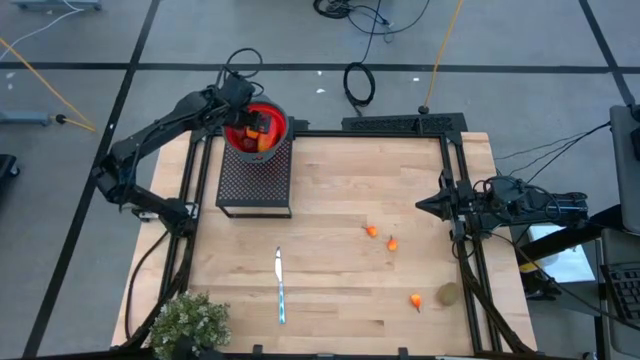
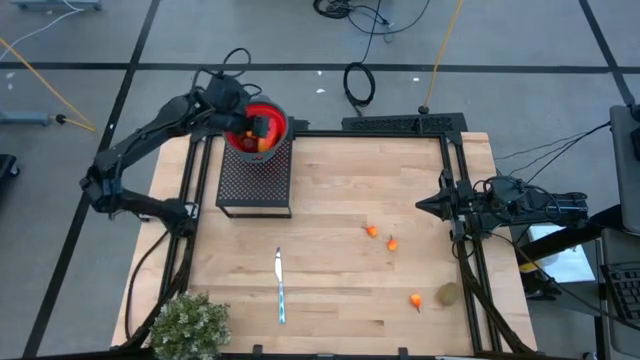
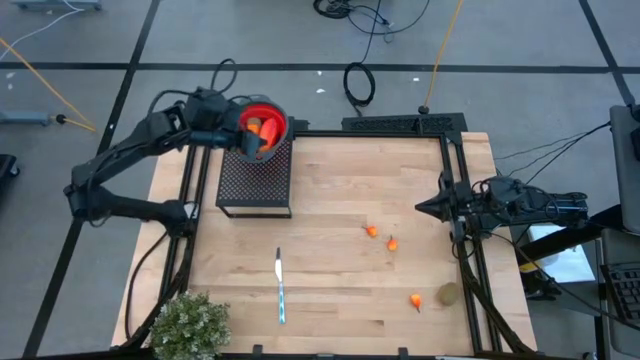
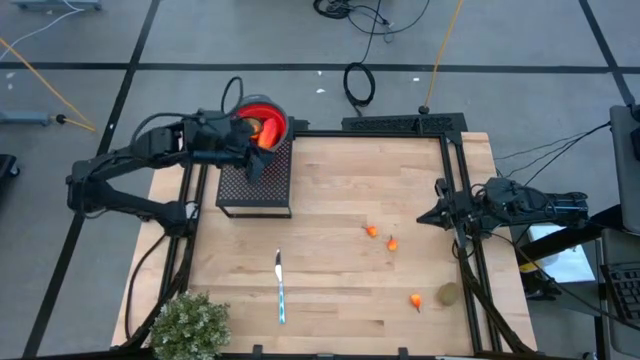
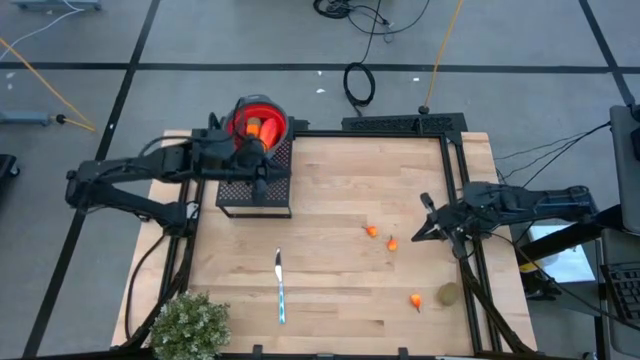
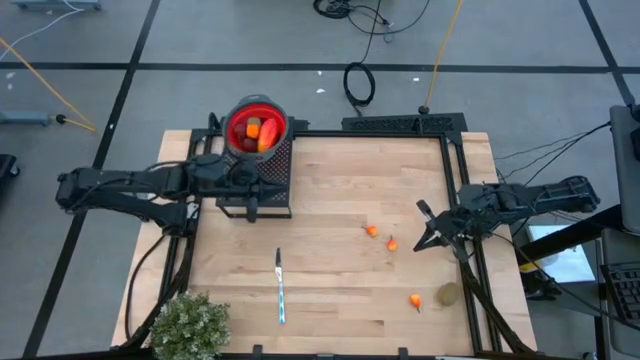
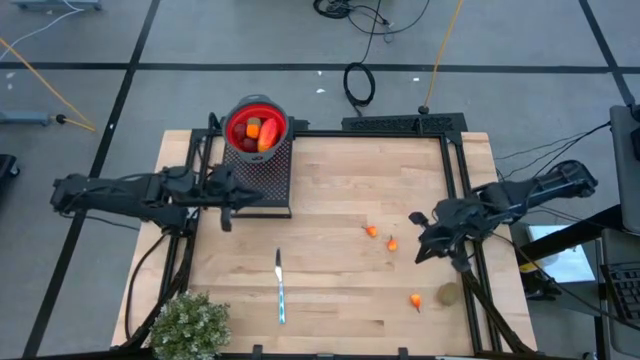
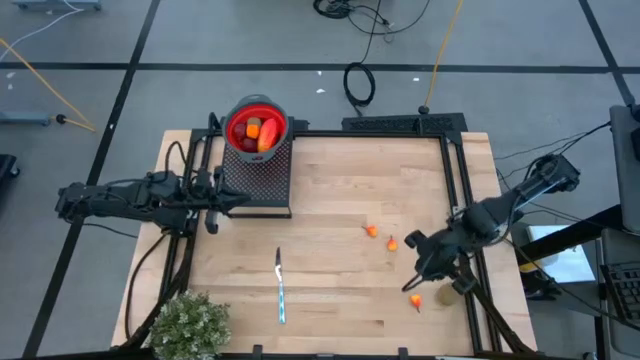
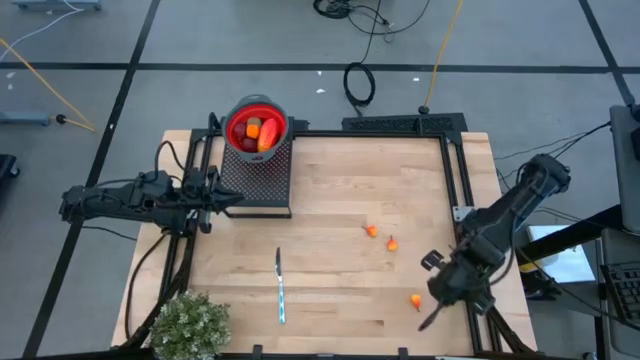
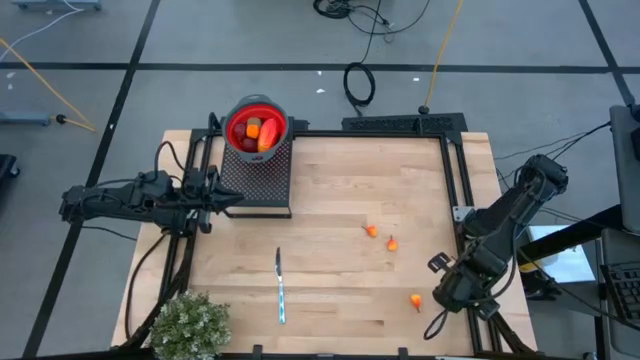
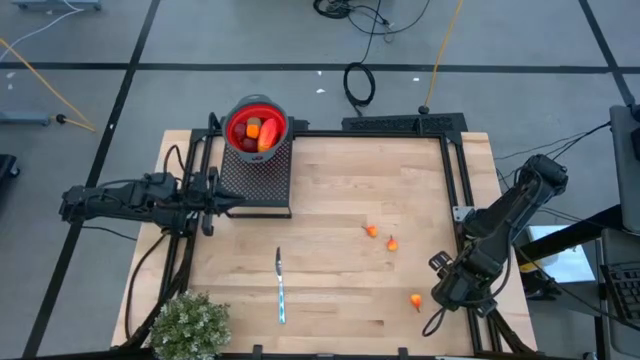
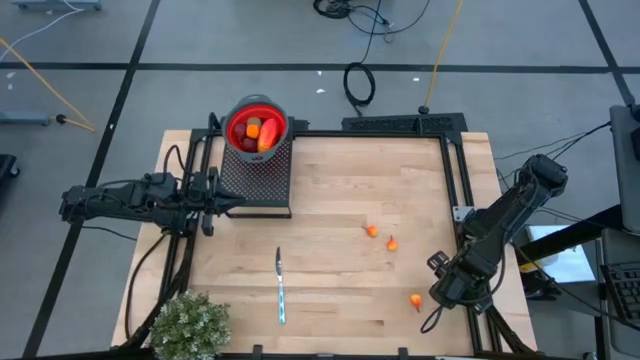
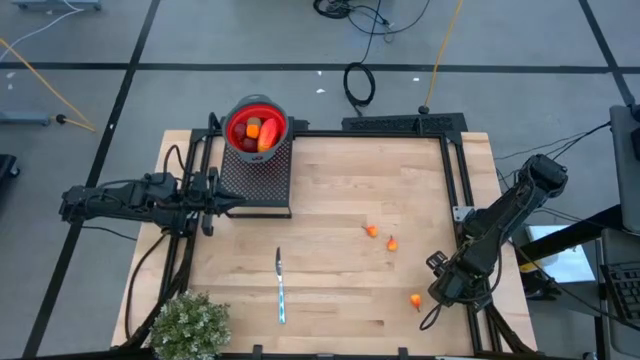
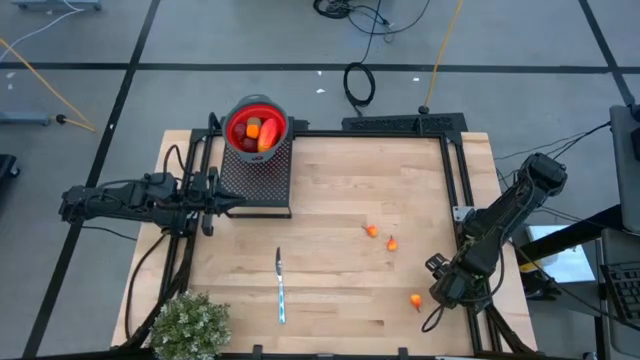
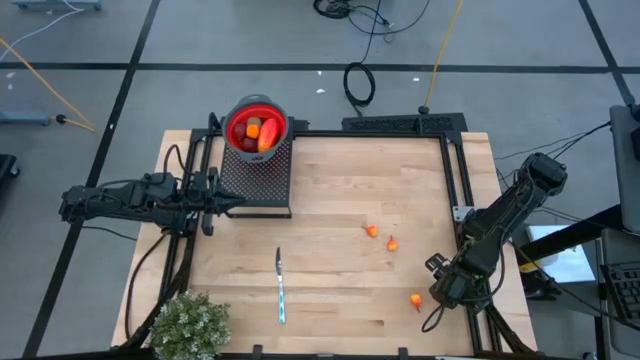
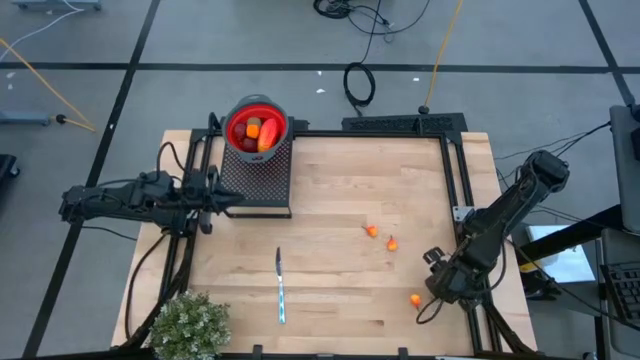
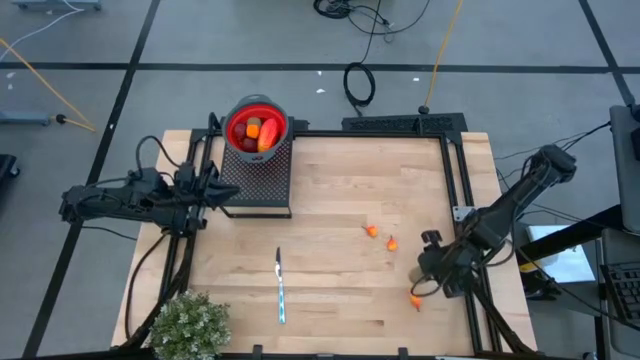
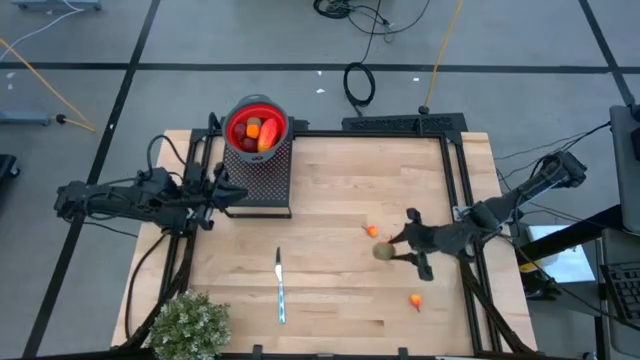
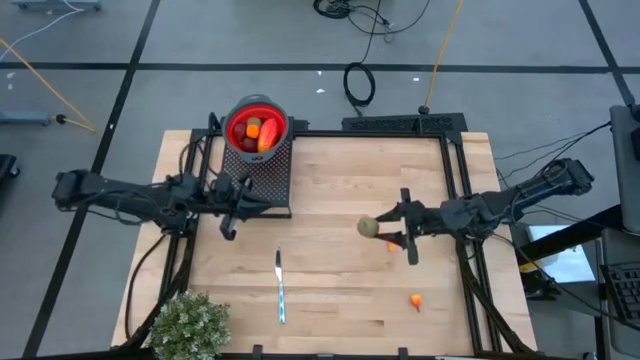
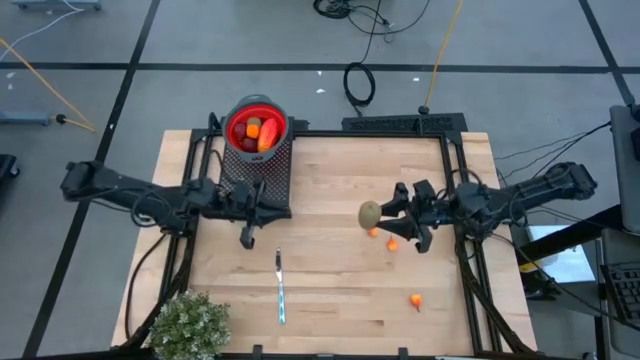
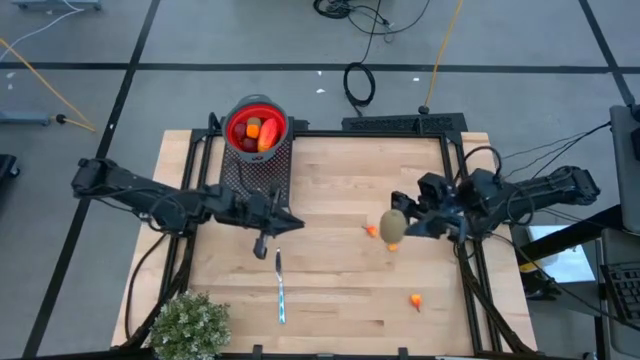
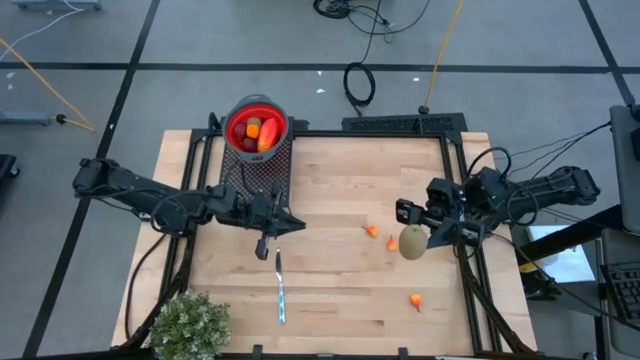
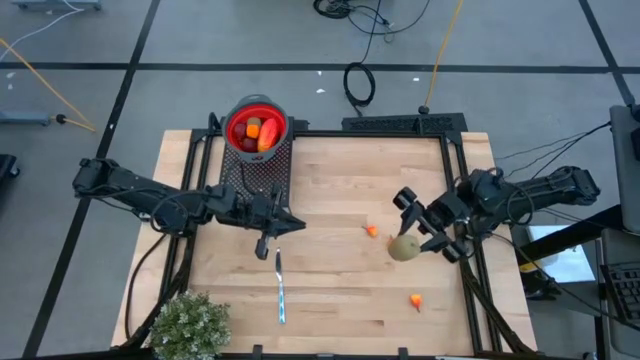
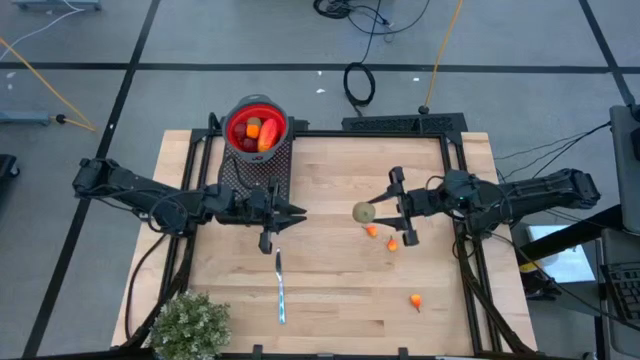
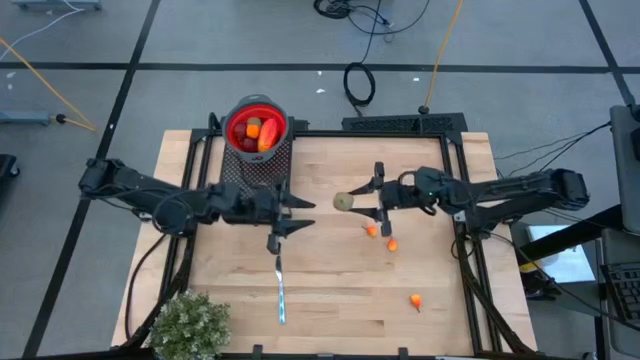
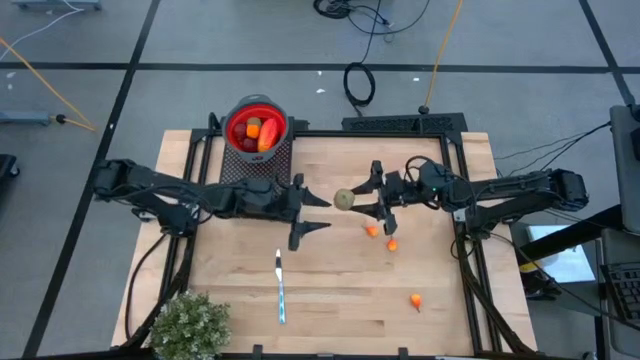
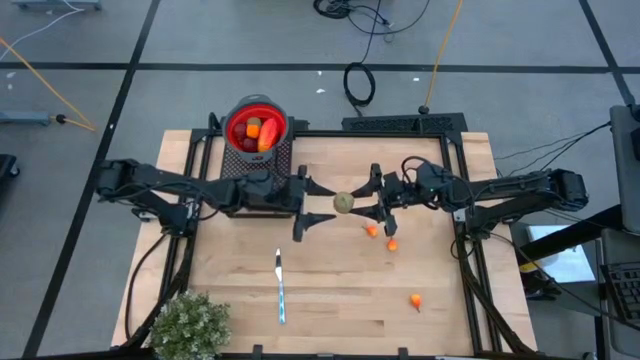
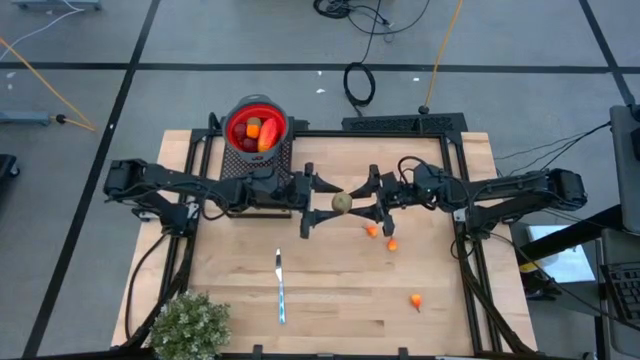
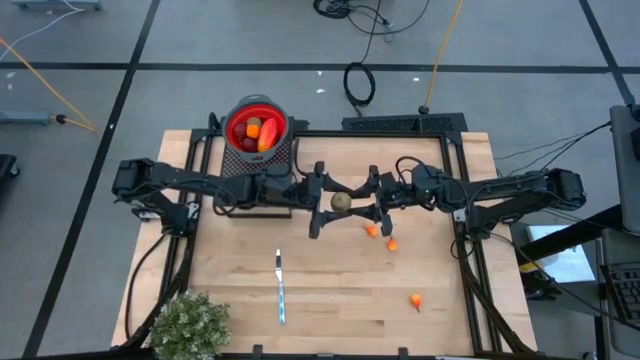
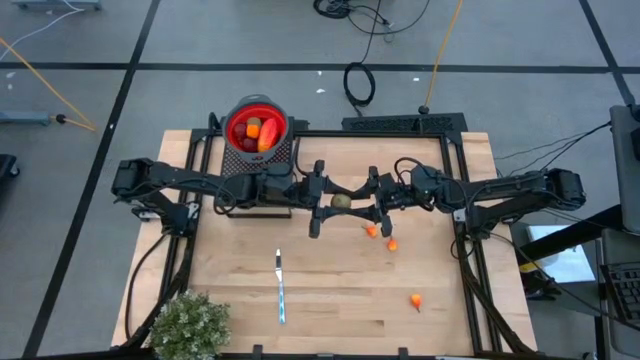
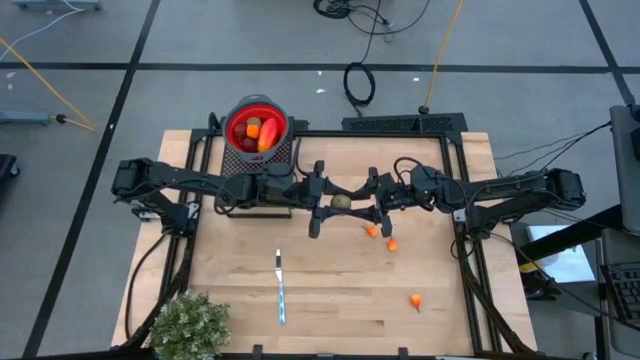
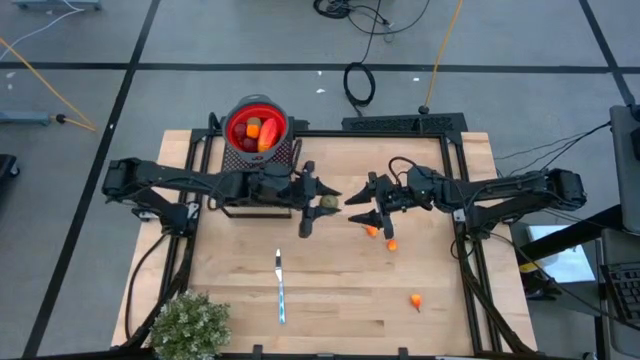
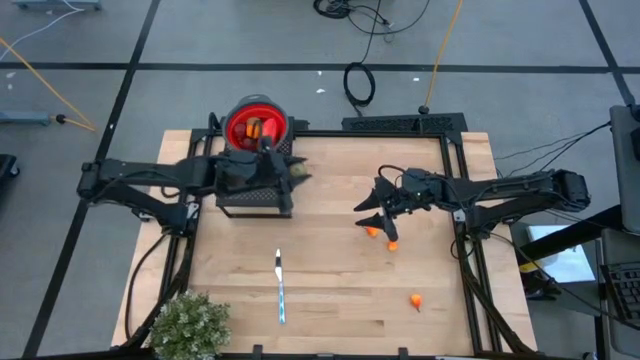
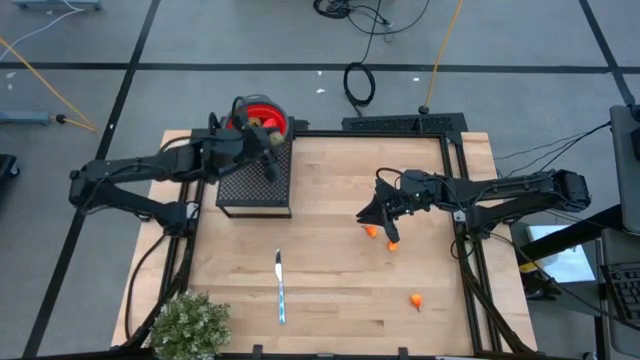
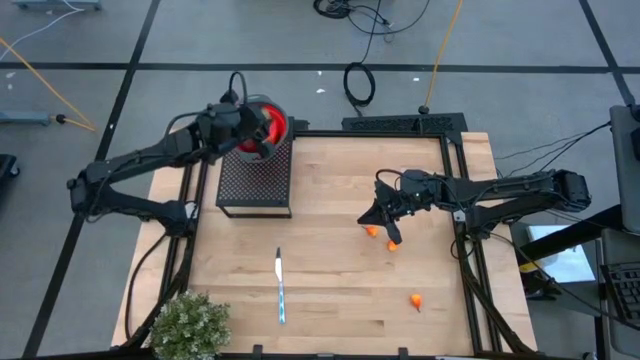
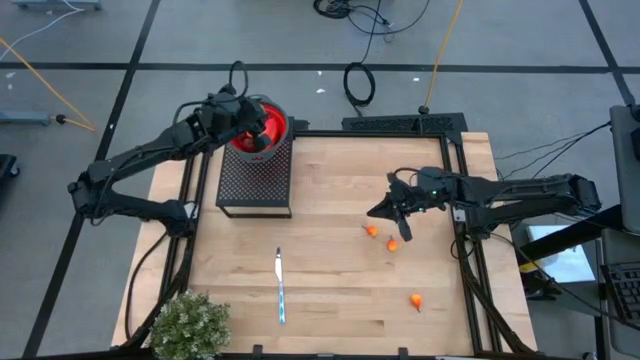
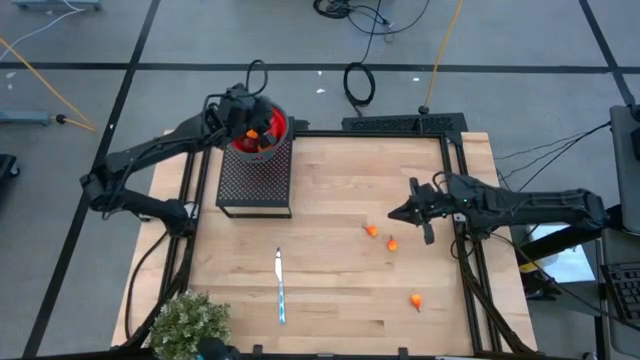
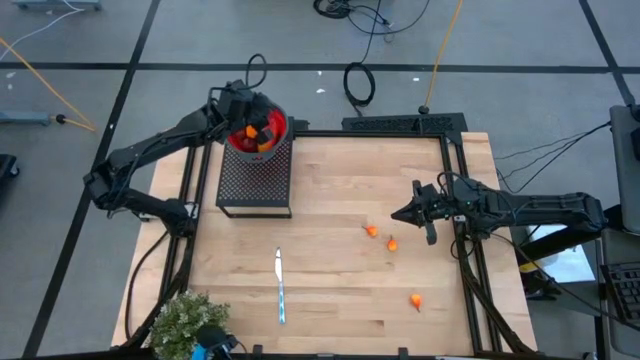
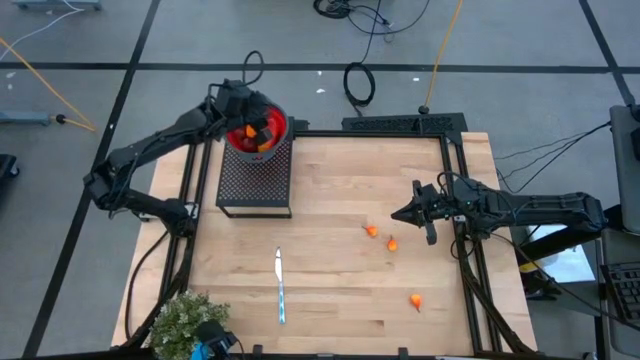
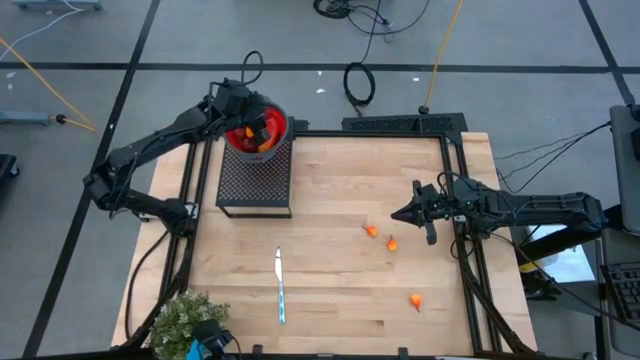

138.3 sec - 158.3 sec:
Task: Pick & Place Fruit
Put the kiwi into the red strainer bowl on the shelf

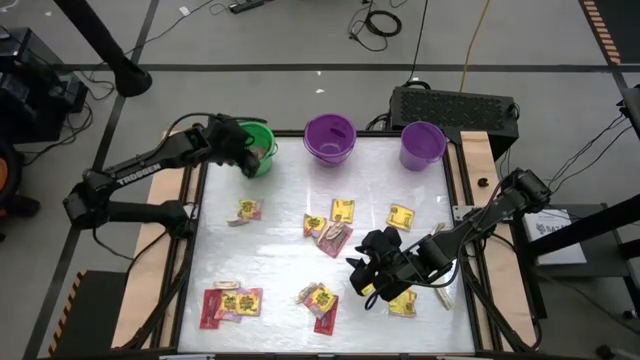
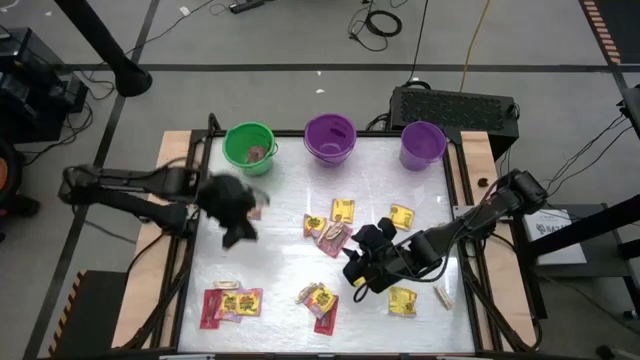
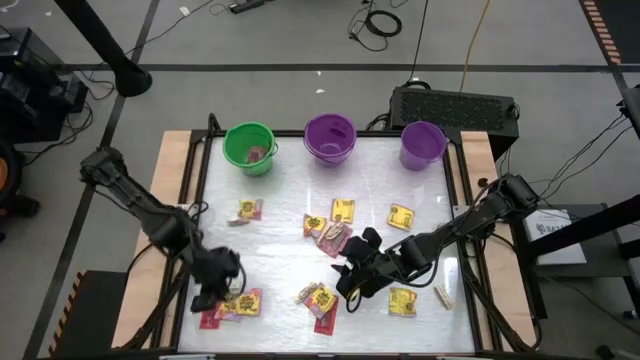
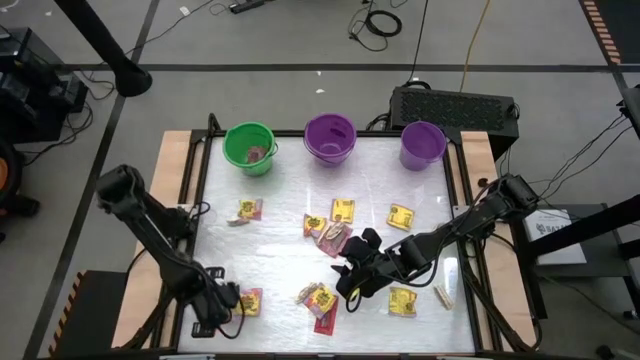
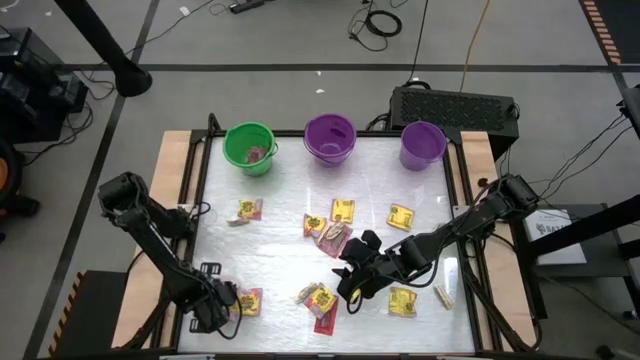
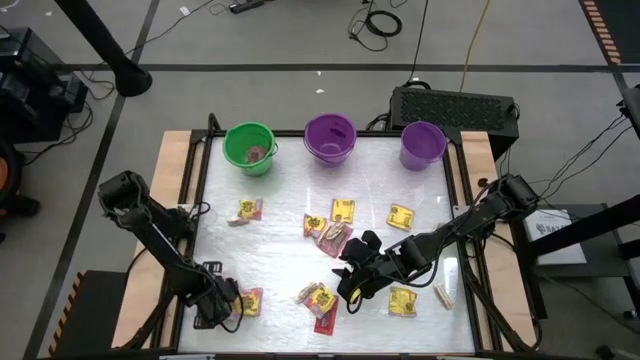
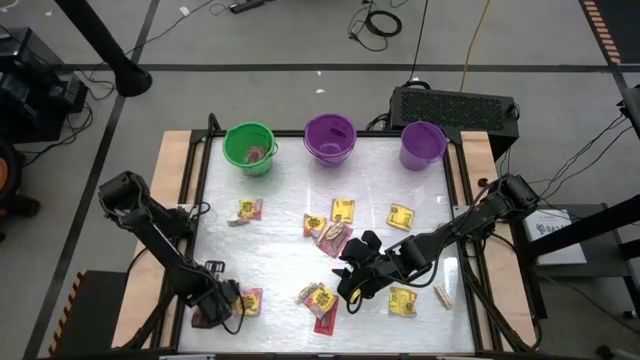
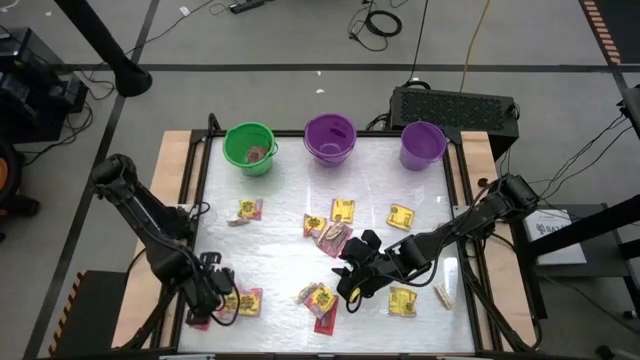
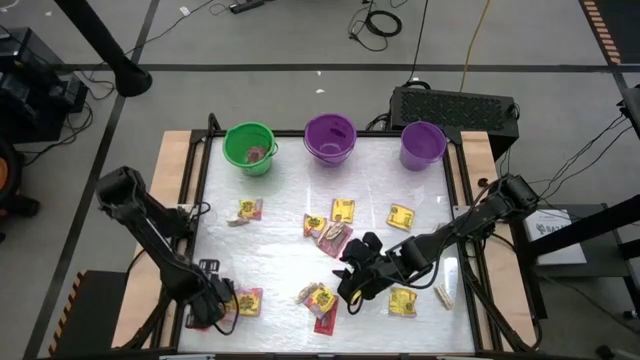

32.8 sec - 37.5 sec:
Task: Sort candy by brand, put in halloween buckets
Put the red candy pack in the green bucket
